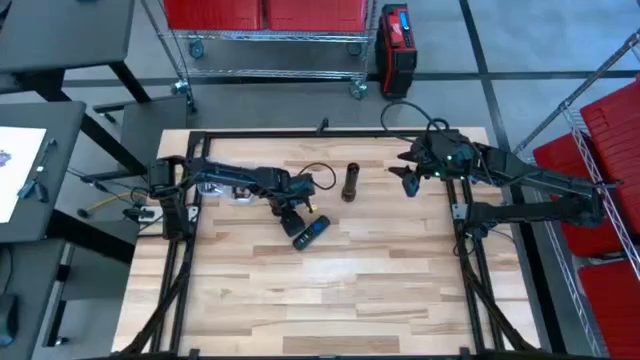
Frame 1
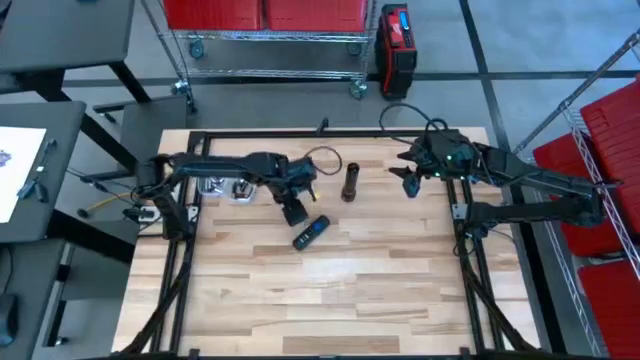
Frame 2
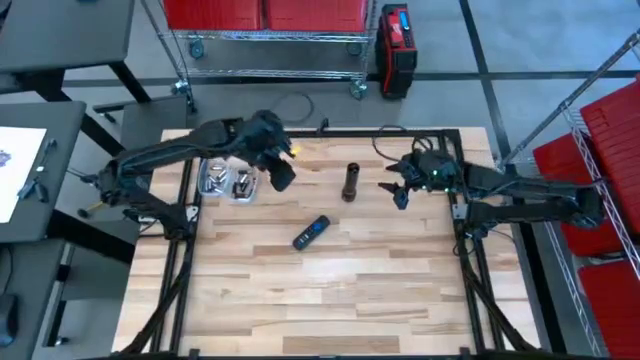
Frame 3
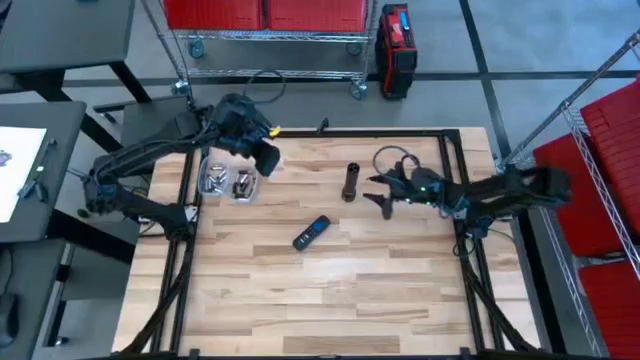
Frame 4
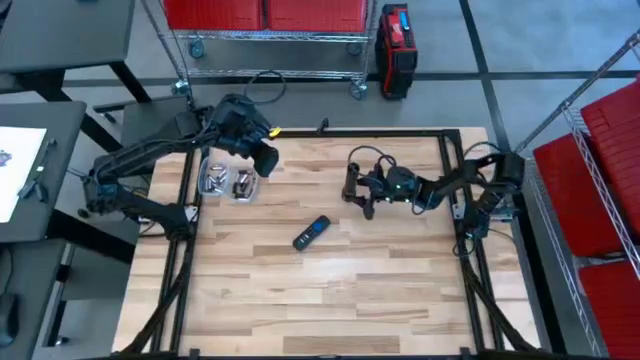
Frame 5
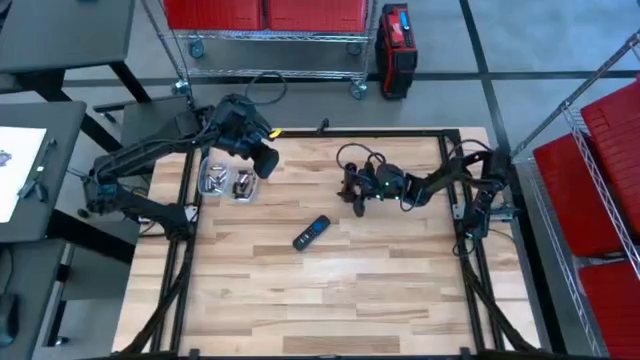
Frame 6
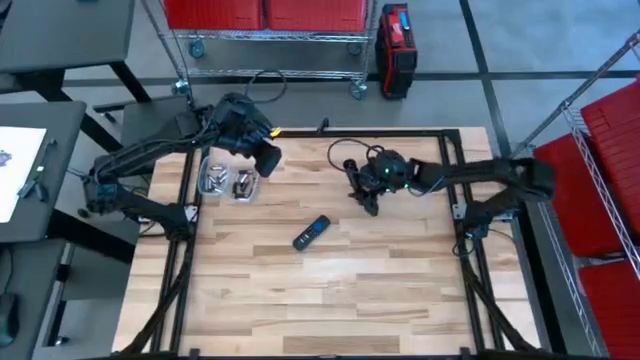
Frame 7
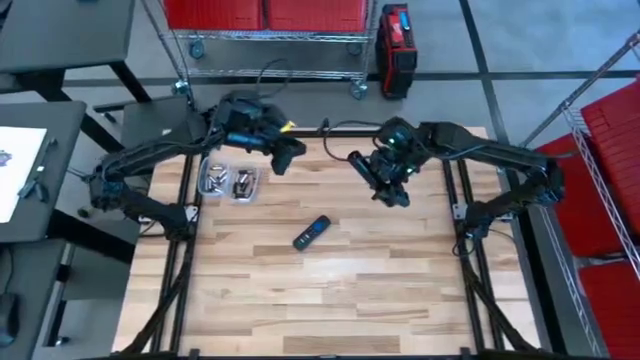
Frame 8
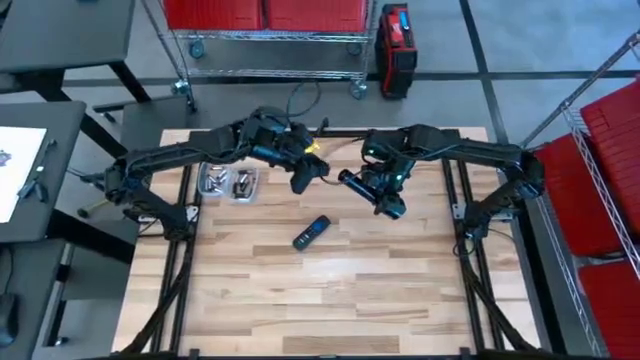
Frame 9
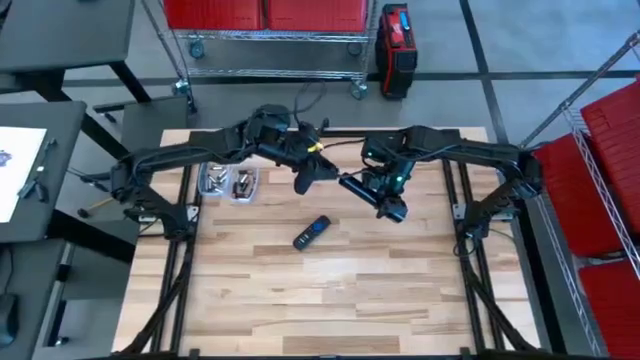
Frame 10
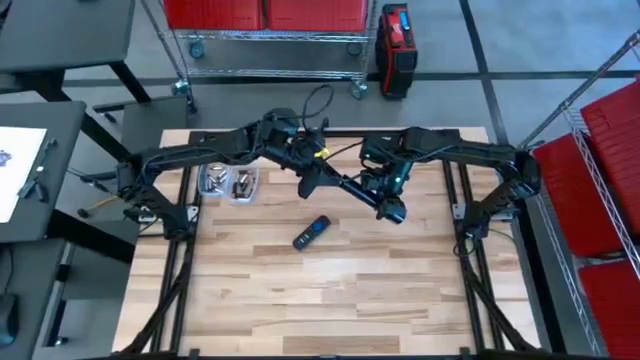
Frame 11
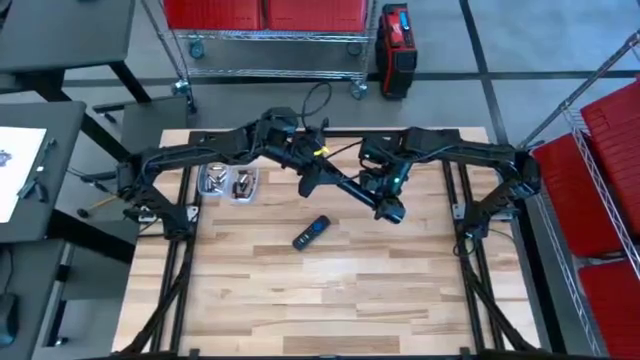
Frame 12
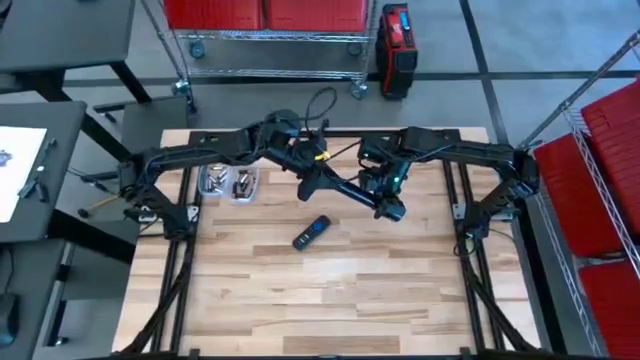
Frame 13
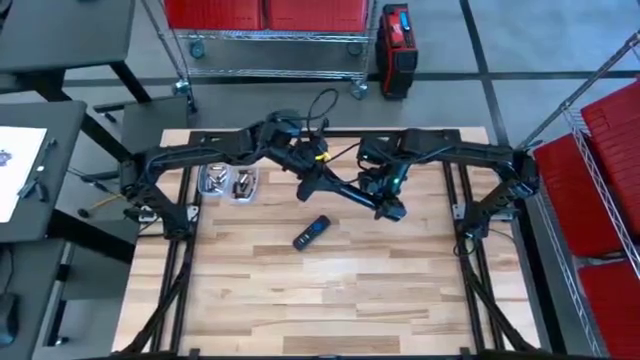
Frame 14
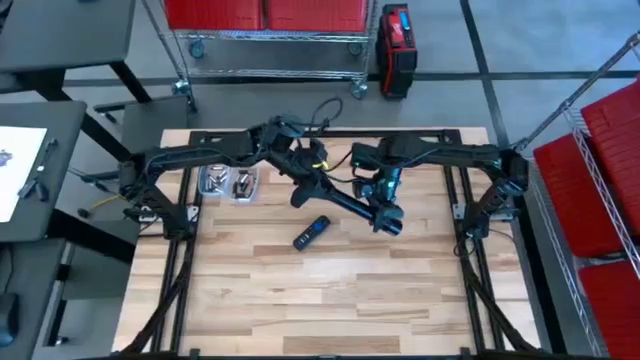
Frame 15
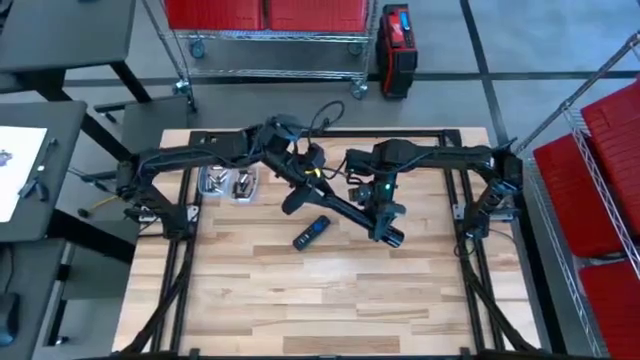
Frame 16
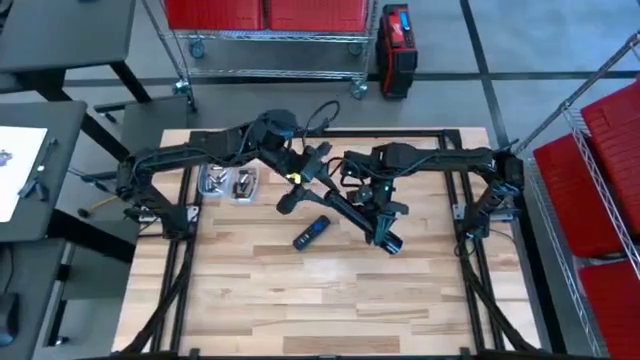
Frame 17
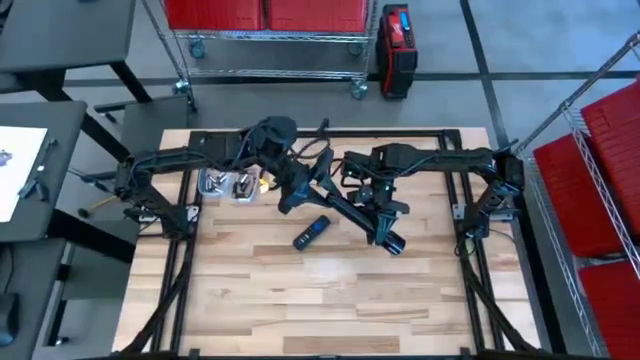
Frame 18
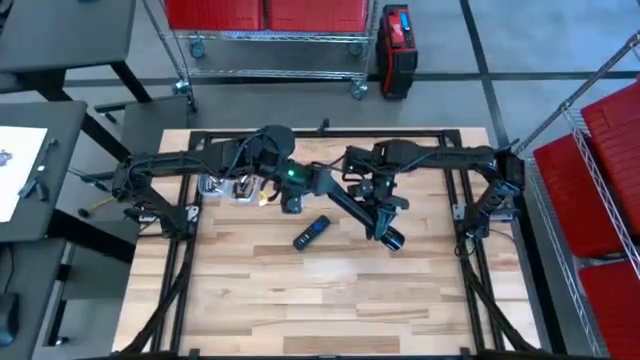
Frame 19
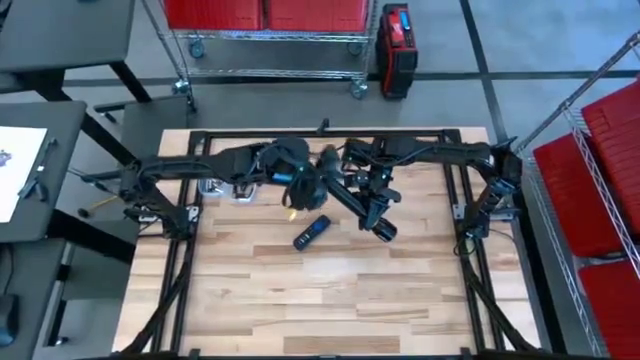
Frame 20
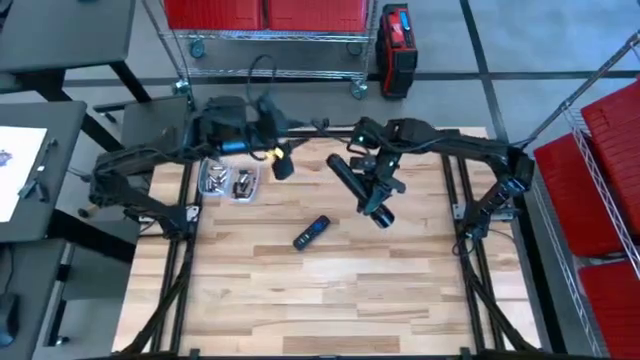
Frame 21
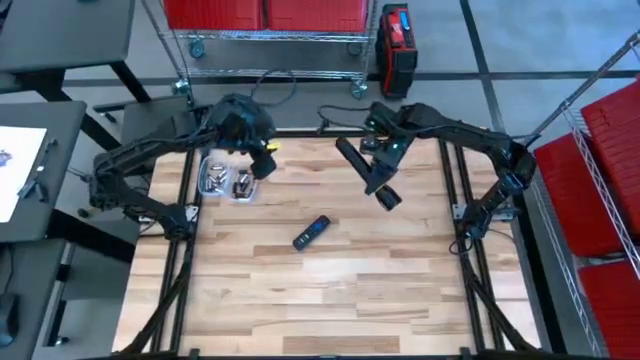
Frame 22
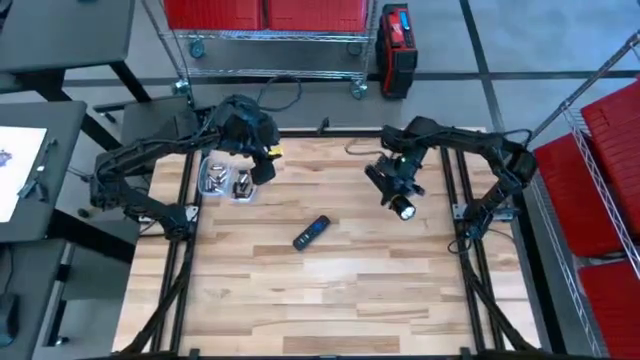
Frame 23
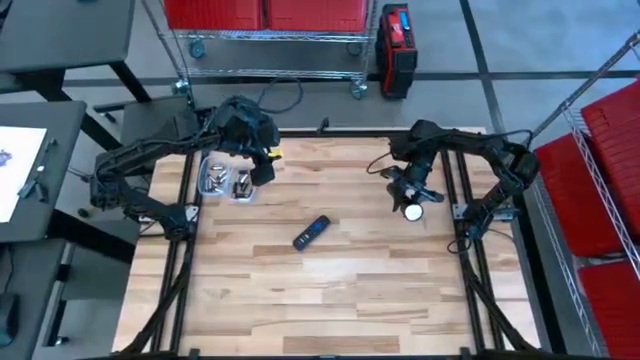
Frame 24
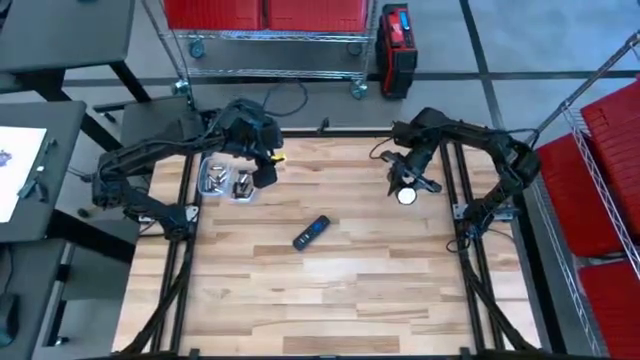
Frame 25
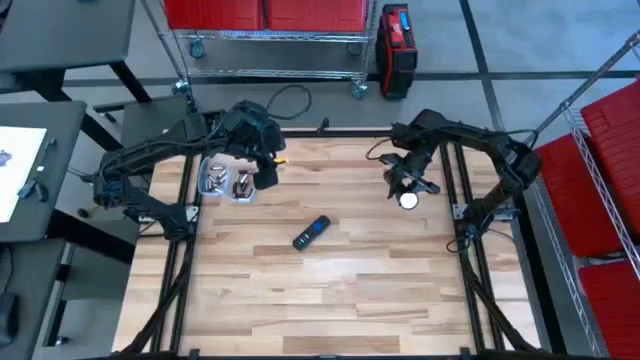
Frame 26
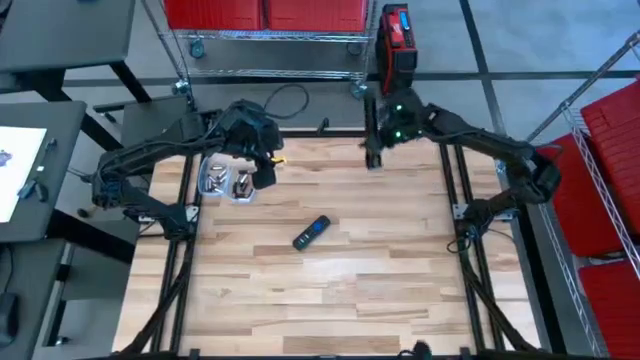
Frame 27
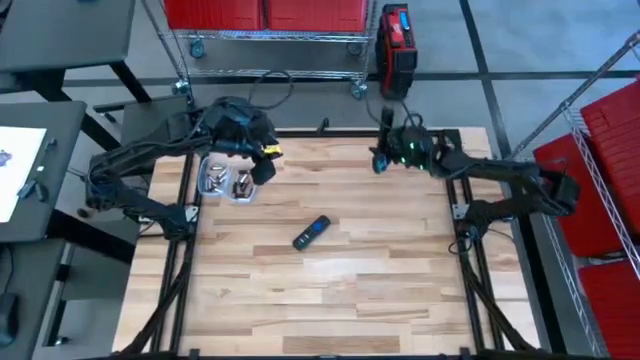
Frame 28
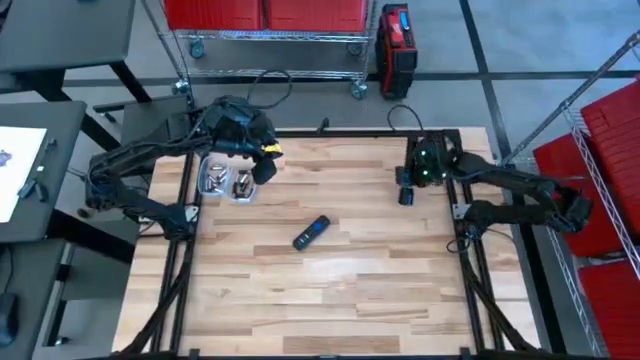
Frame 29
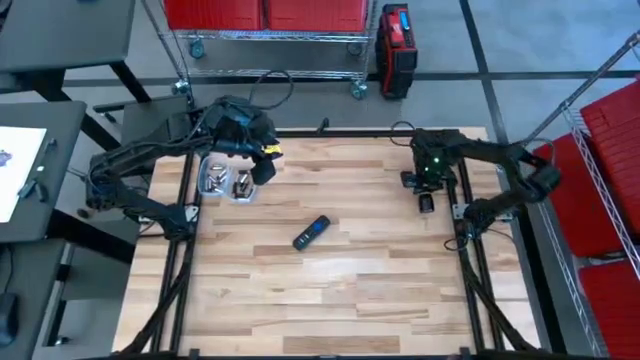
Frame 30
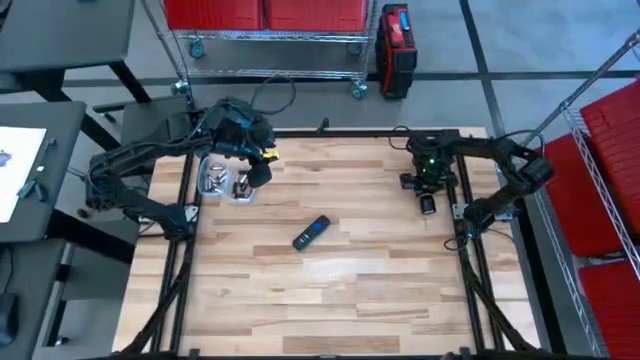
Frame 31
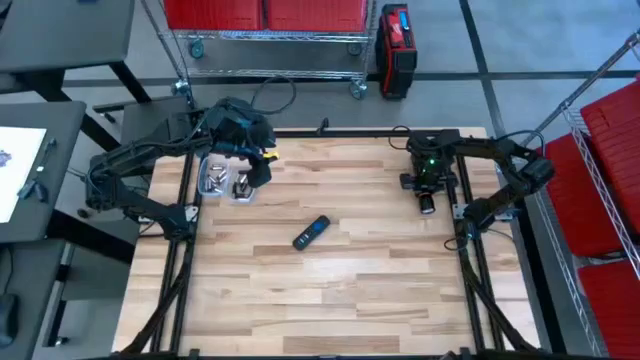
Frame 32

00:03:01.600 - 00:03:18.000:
Task: Insert battery
Close the flashlight's battery compartment

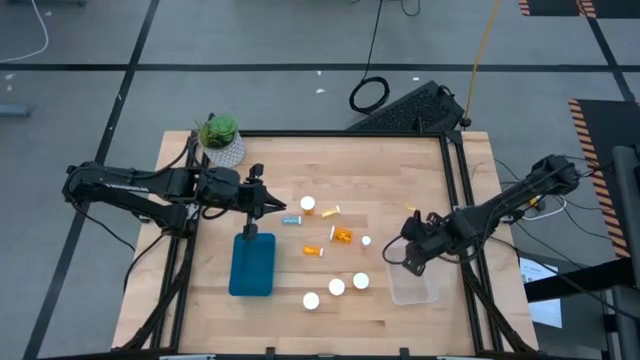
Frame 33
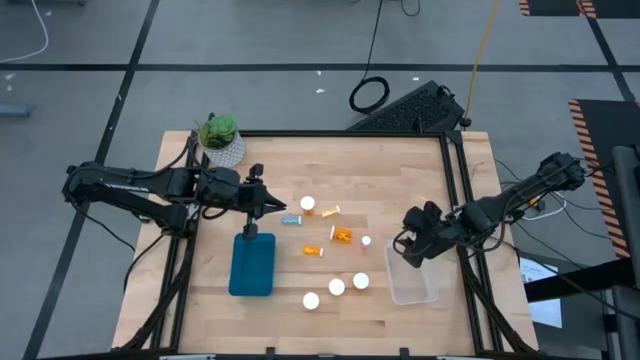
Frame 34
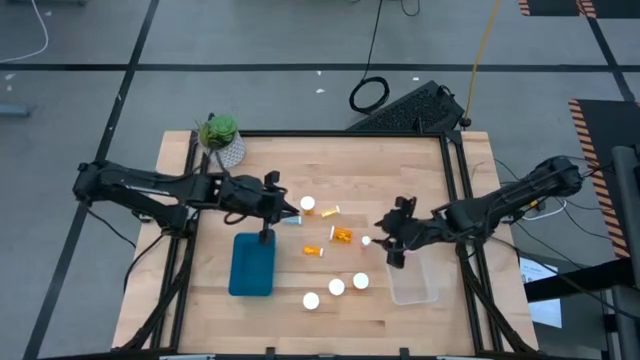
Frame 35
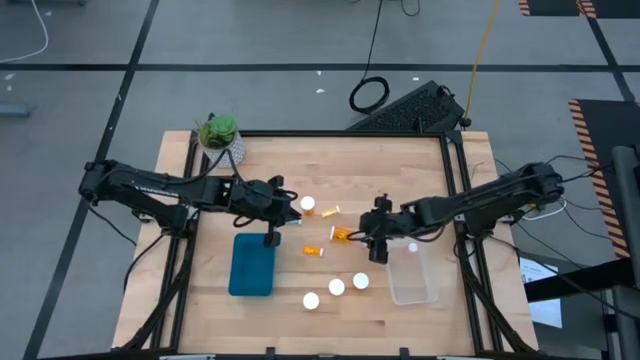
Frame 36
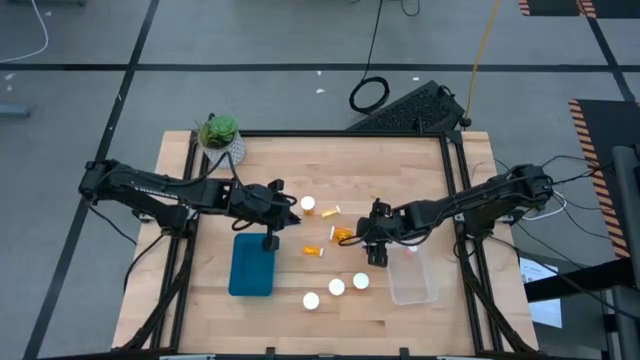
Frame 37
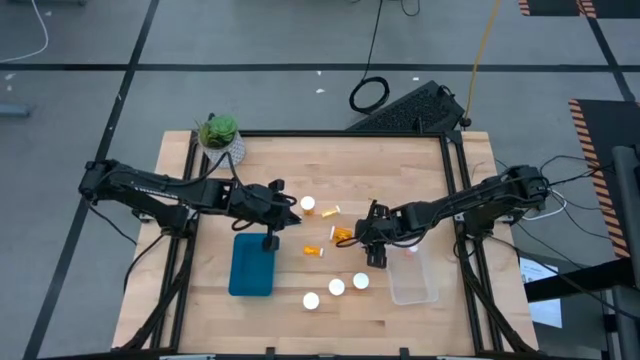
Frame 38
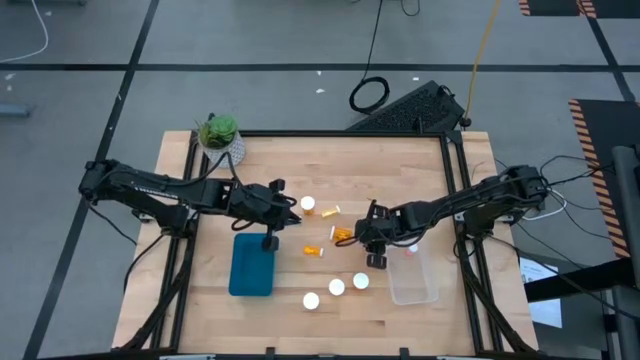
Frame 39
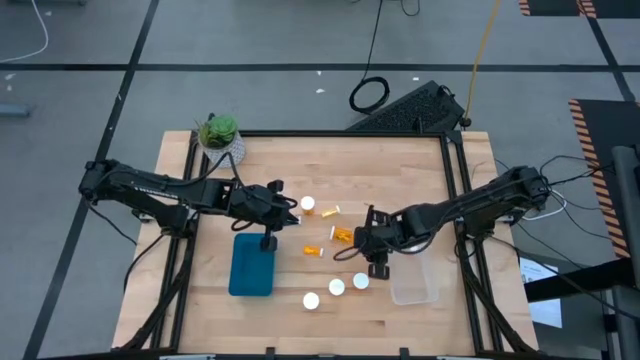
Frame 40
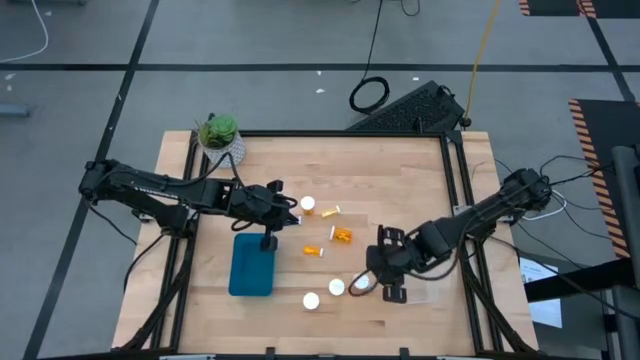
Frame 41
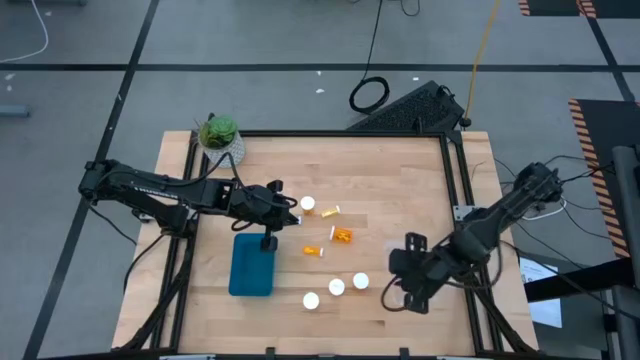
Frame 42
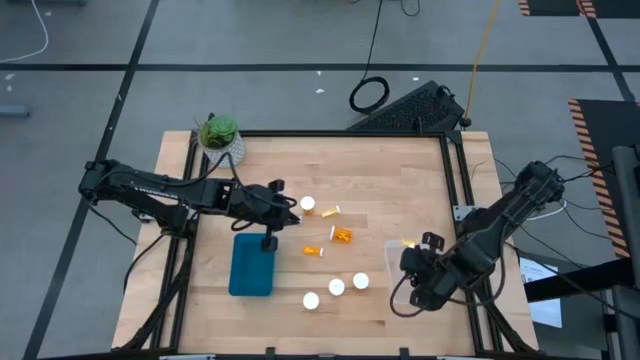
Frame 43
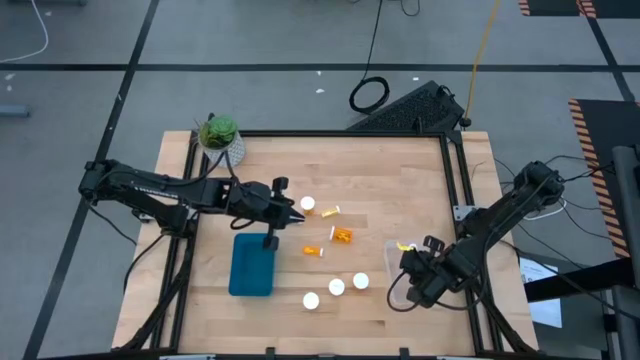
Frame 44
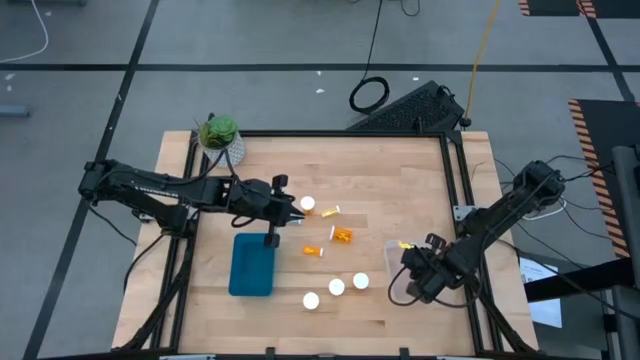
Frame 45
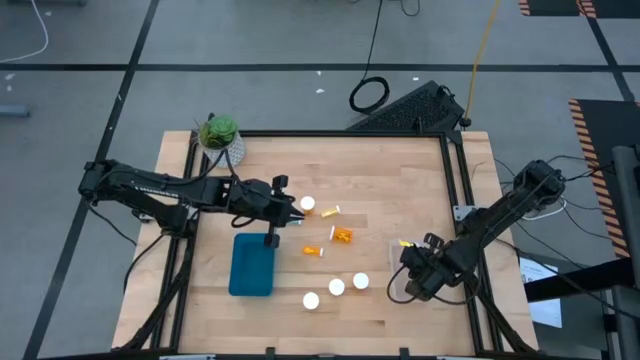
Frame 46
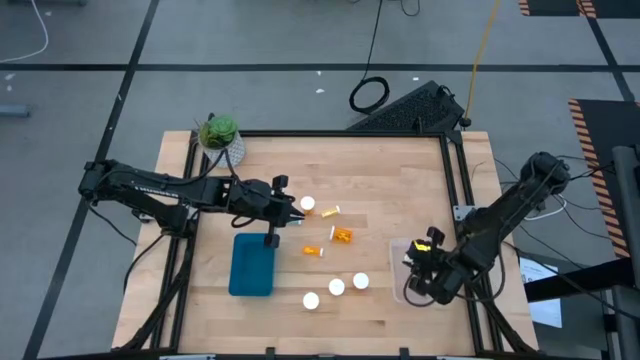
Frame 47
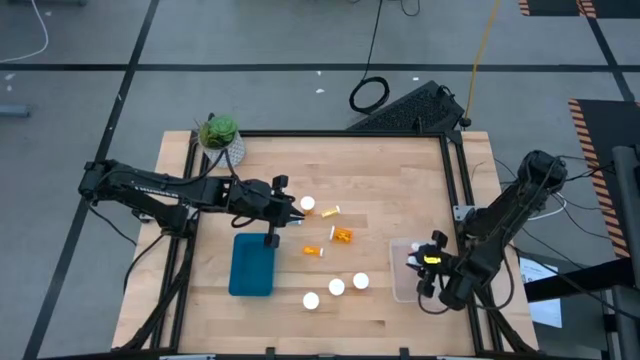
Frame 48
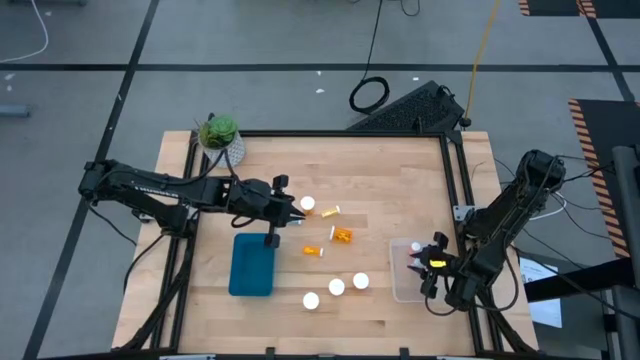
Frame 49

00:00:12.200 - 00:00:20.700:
Task: Pick and place medicine bottles into bin by pill shape (circle, oval)
Put the purple bottled tablet into the transparent bin
